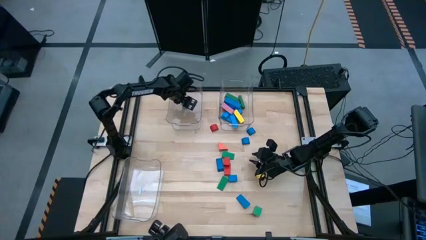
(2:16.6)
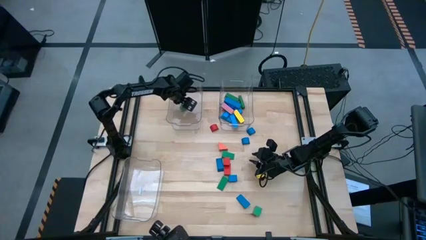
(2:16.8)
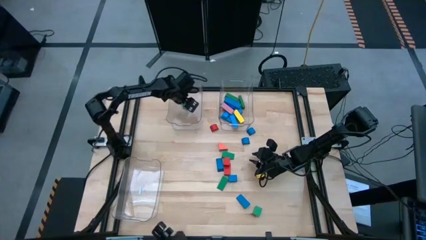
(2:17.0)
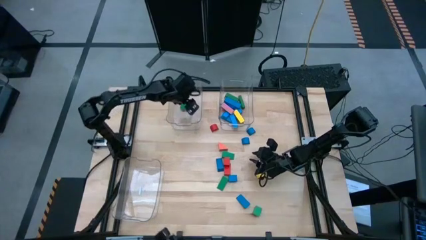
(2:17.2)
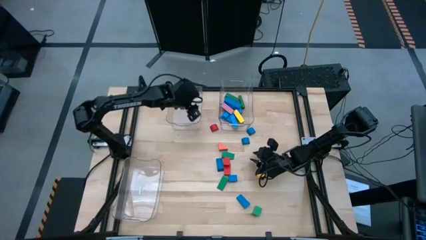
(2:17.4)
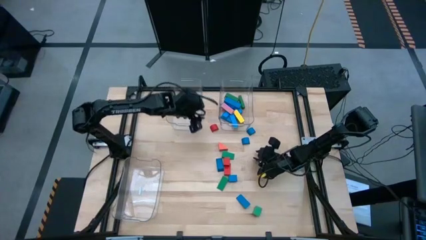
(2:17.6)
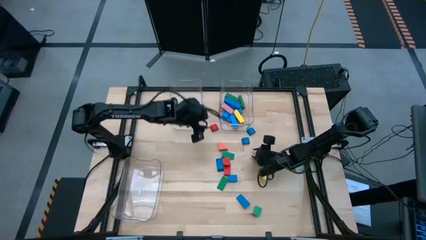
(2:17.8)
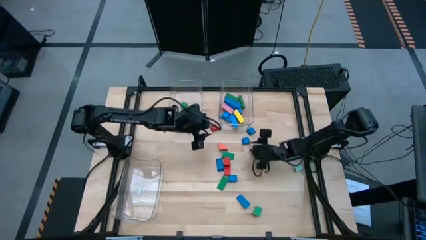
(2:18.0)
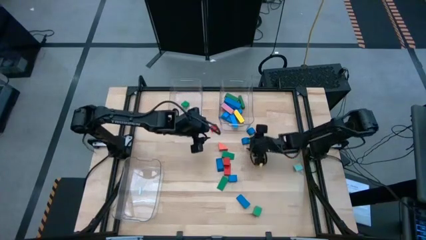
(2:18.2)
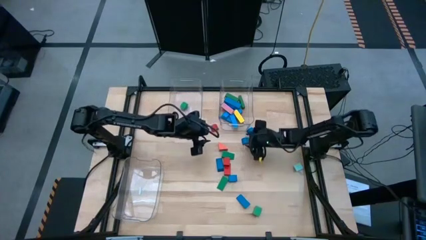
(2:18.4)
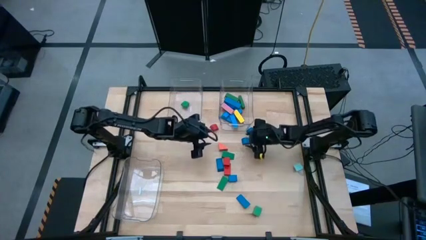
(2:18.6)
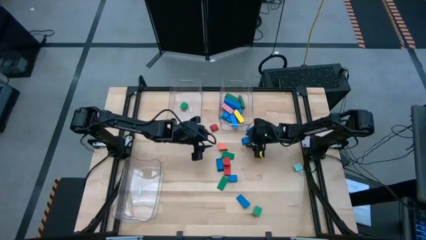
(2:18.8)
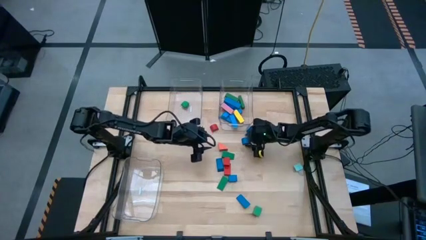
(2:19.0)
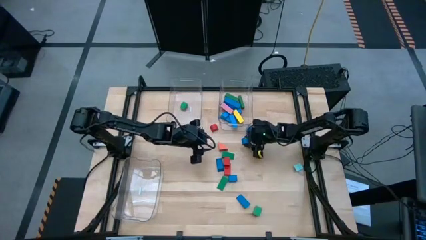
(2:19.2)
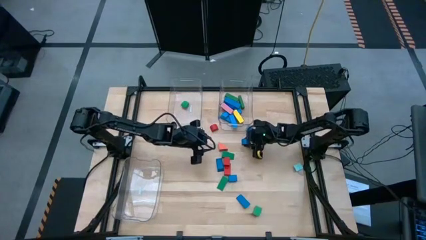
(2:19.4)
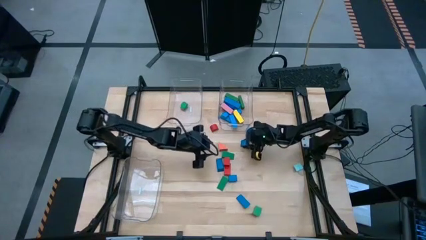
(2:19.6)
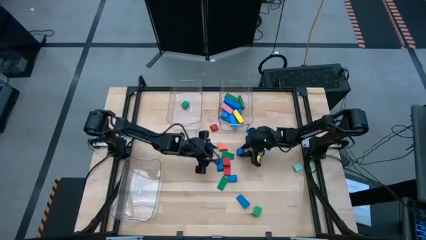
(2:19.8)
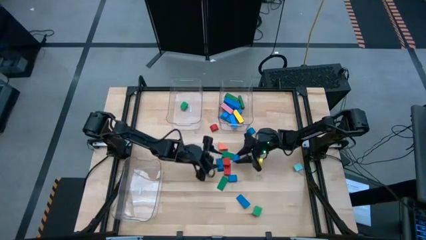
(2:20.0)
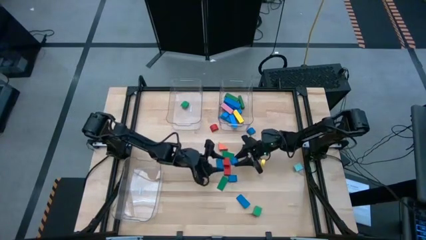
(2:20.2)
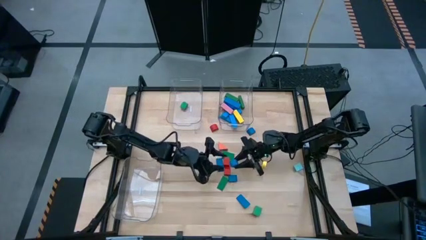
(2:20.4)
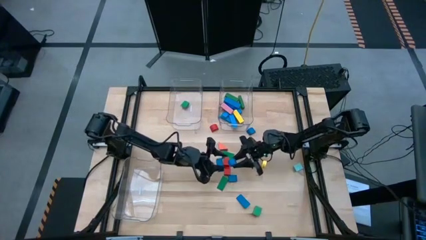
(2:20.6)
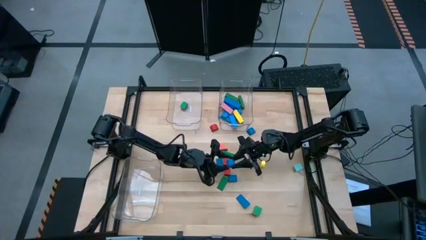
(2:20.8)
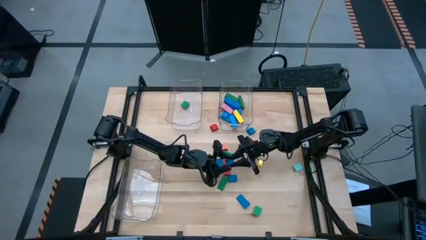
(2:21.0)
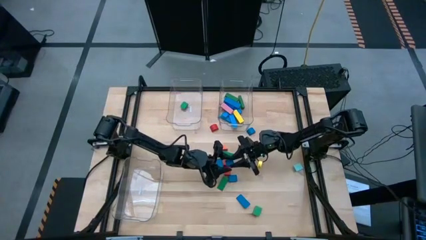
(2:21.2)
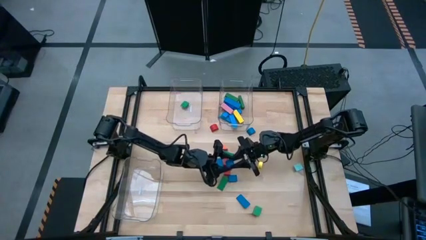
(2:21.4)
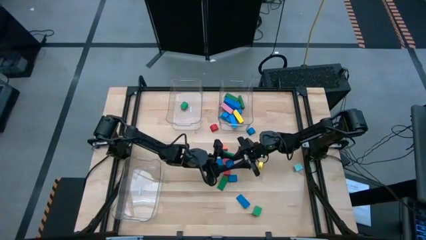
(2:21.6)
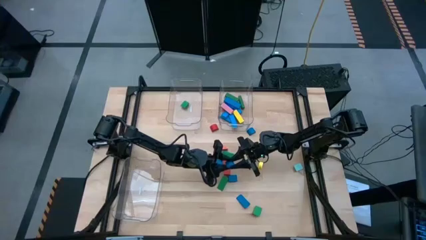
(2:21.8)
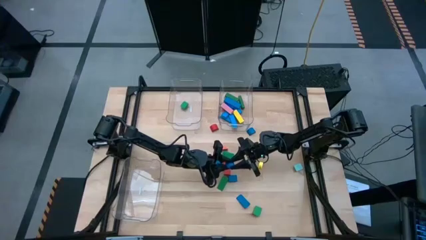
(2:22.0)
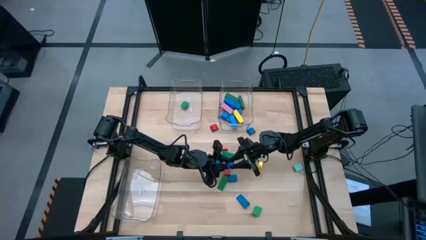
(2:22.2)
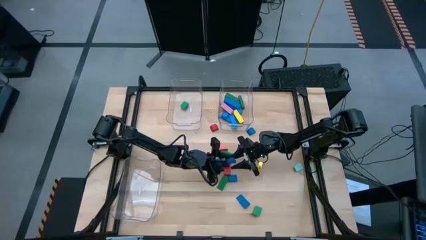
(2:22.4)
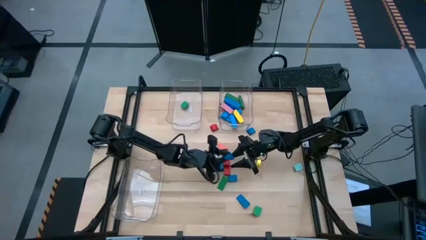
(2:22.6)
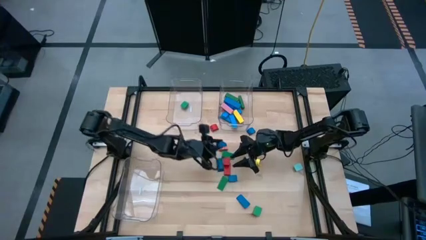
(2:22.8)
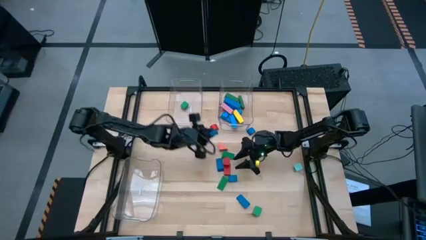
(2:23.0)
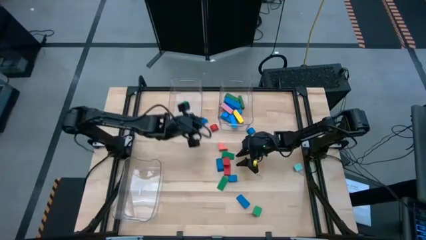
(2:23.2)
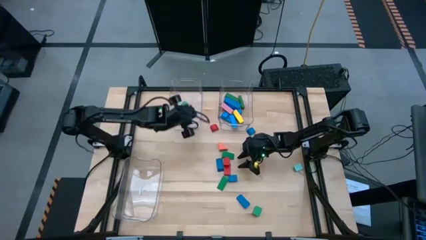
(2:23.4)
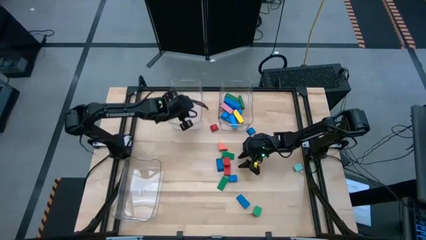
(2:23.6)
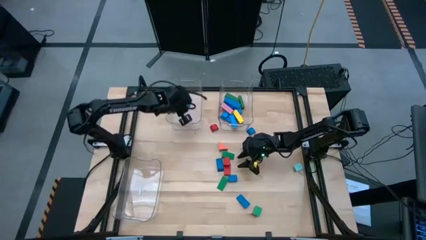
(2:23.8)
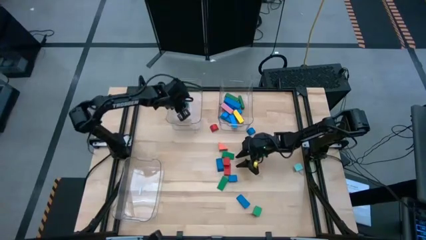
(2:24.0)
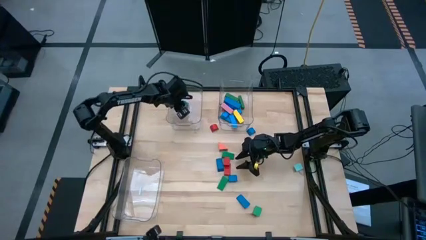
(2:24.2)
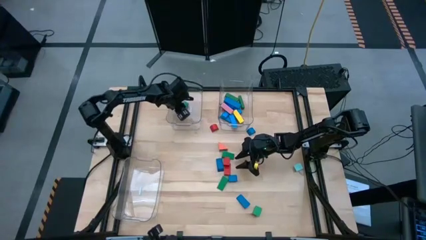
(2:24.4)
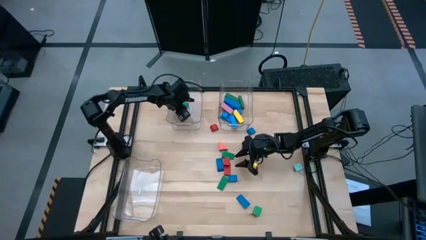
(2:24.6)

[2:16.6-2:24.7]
Task: Sort blocks by size
Put the blue half cylinder block into the top left transparent bin

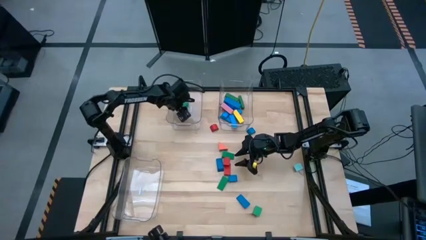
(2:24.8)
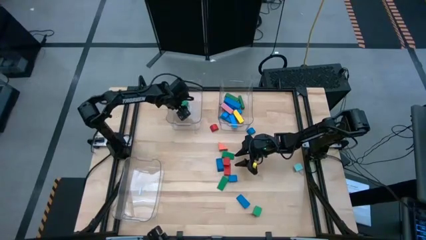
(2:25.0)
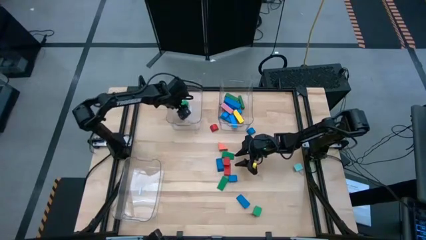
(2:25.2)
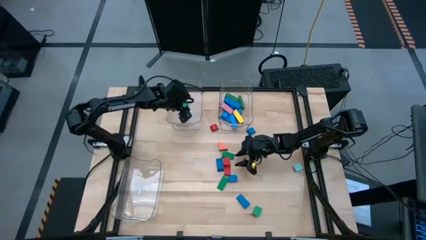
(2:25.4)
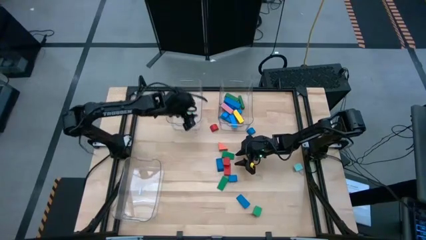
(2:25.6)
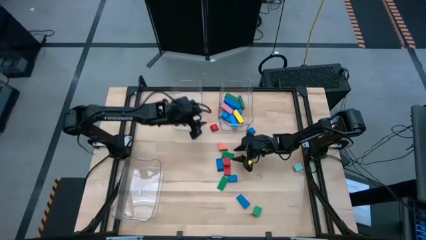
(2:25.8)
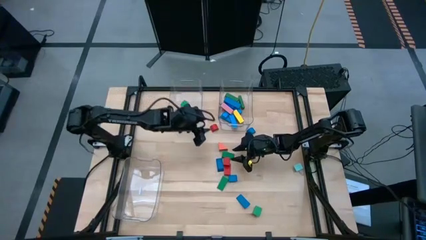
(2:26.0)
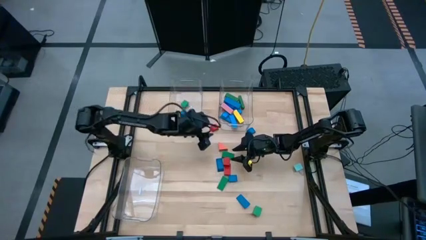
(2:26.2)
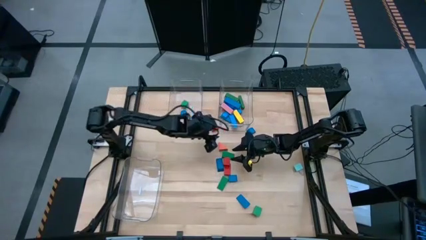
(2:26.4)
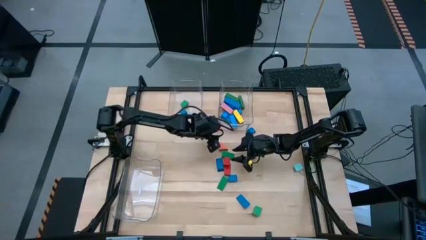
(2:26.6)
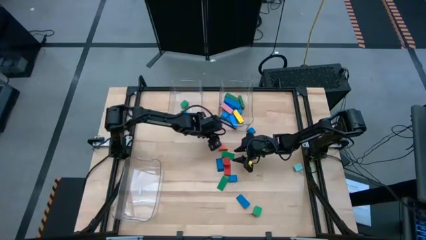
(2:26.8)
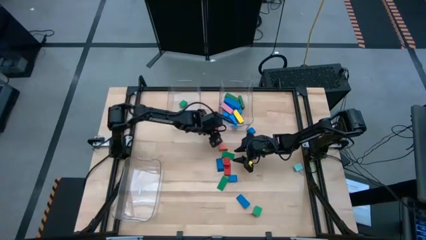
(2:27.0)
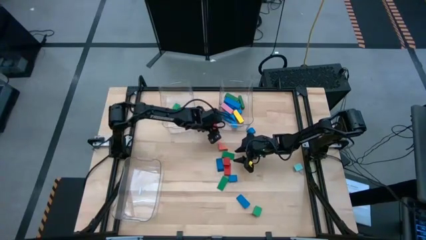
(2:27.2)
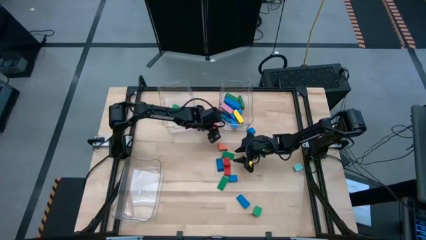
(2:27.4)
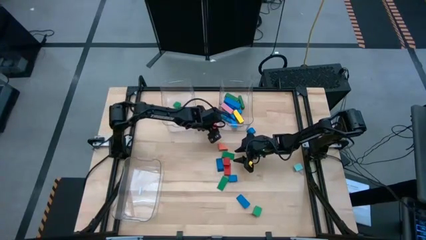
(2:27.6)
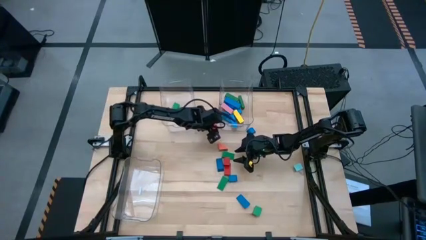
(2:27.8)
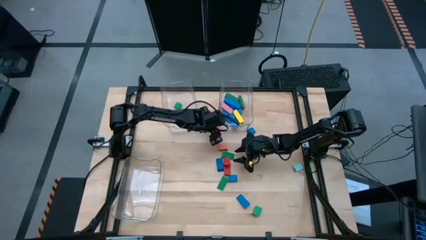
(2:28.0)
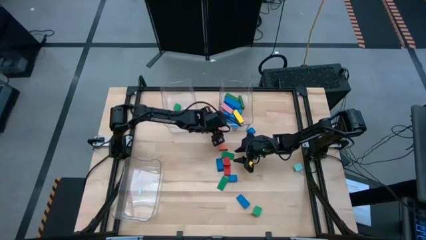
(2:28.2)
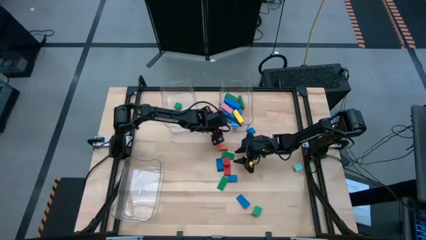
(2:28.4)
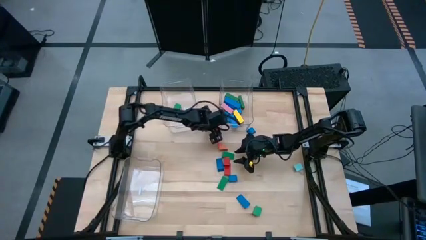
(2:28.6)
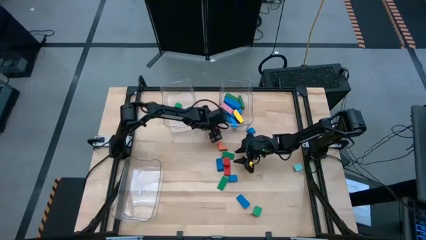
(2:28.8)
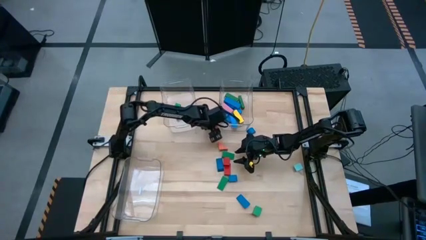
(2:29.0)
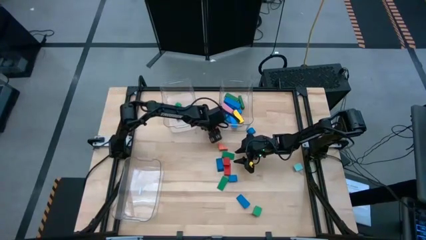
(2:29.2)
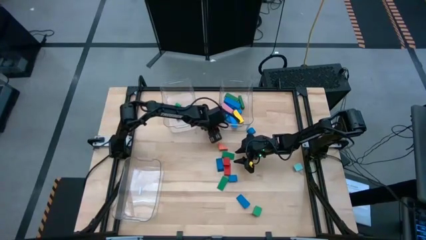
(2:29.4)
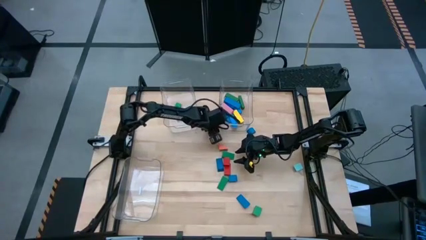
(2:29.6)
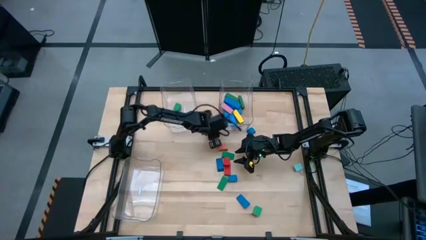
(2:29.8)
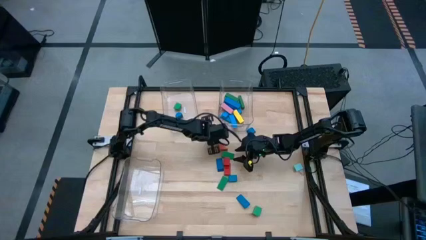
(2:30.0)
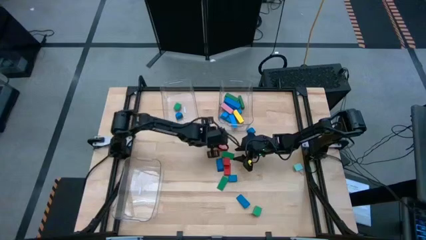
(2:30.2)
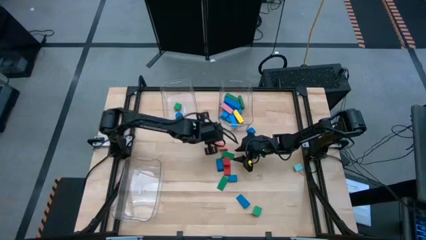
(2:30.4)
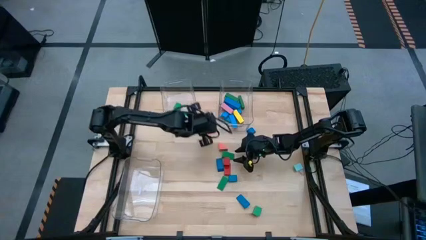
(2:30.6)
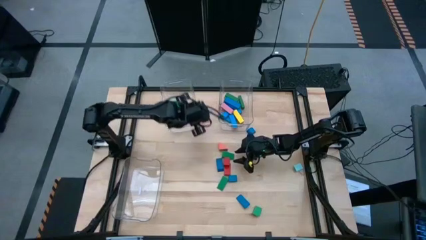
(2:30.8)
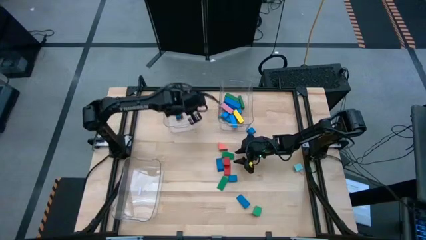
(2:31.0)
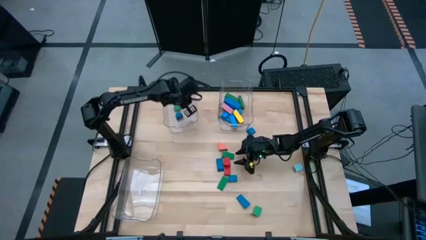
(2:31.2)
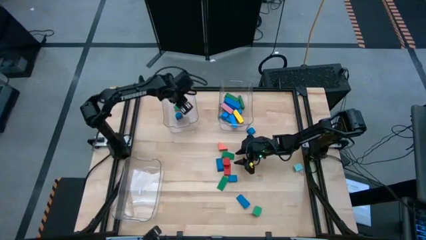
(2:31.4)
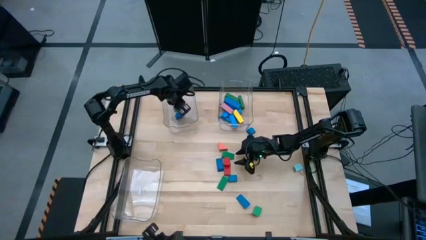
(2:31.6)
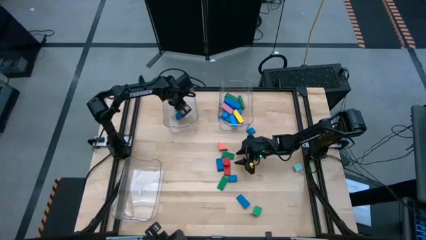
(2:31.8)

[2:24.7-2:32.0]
Put the red half cylinder block into the top left transparent bin

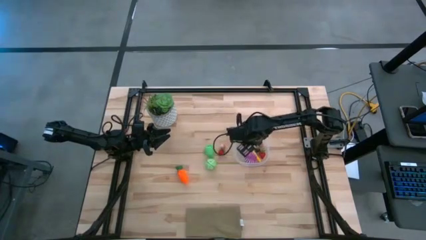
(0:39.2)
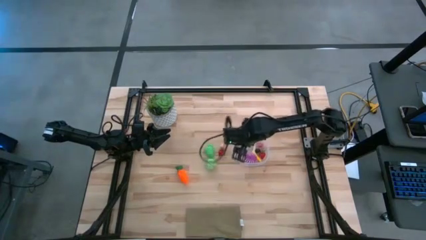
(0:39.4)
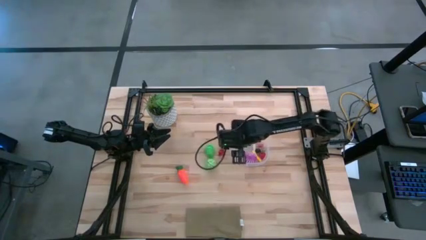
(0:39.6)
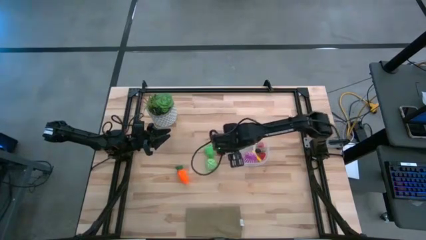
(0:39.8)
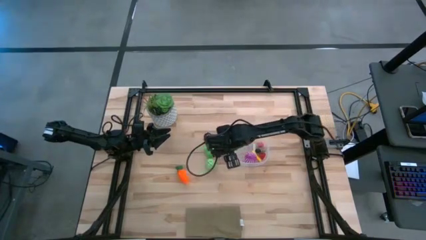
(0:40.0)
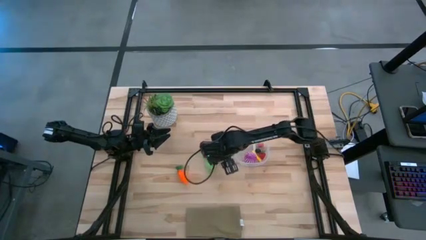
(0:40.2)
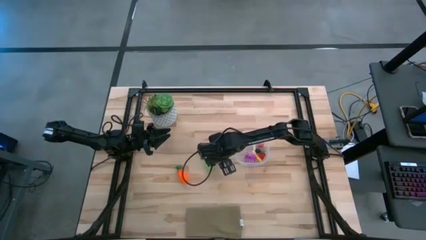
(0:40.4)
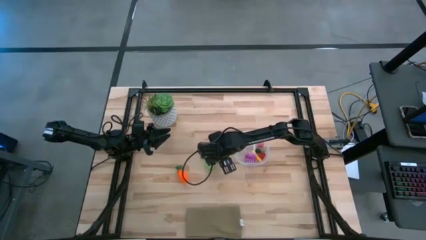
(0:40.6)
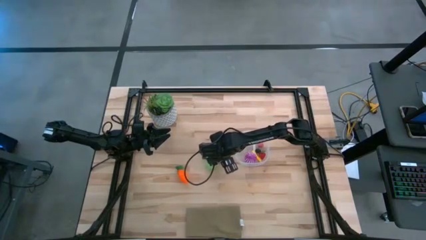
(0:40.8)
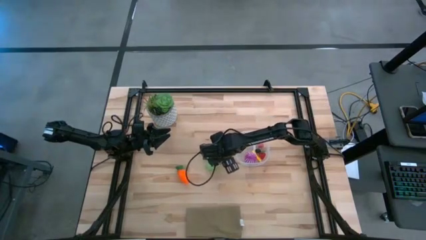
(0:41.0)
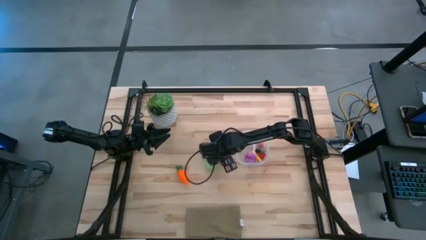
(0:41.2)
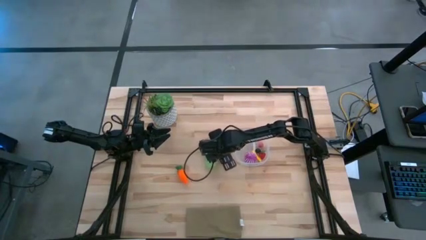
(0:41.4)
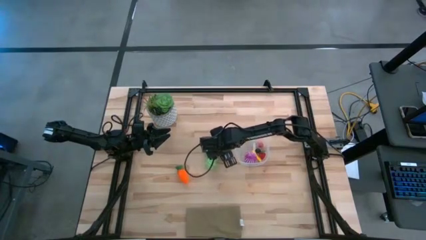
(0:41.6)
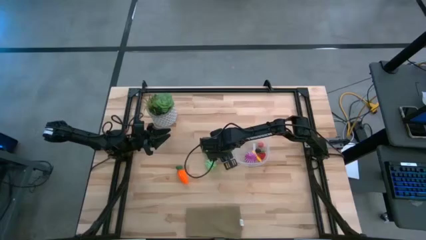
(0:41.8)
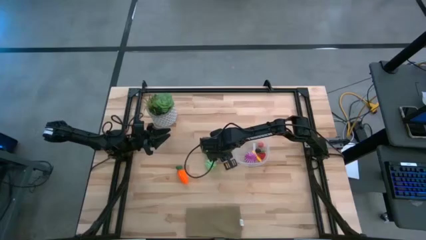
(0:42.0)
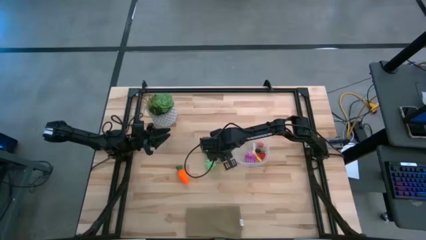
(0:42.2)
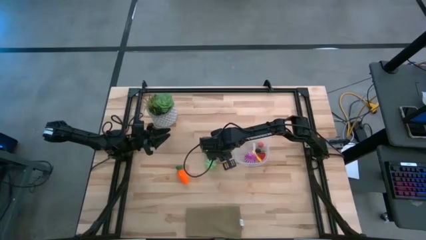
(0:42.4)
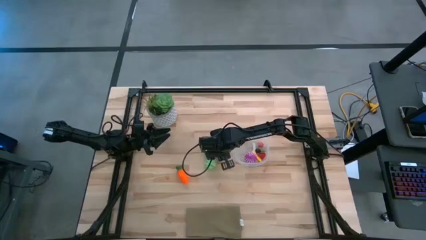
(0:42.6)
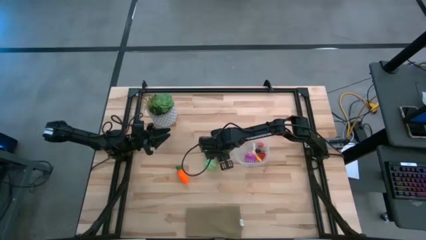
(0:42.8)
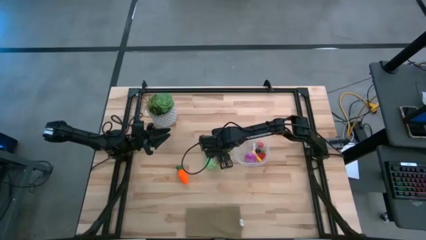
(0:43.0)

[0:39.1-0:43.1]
Task: Pick and placing Produce into tupperware
Put the red strawberry into the transparent container
